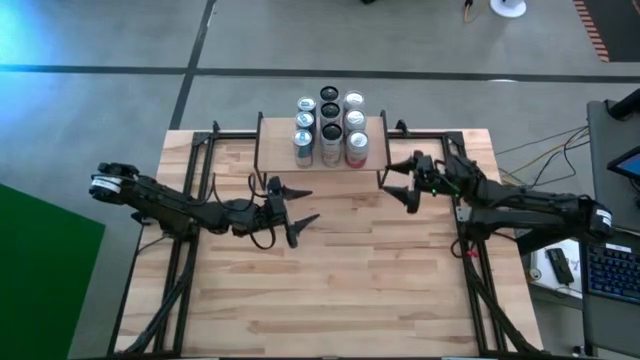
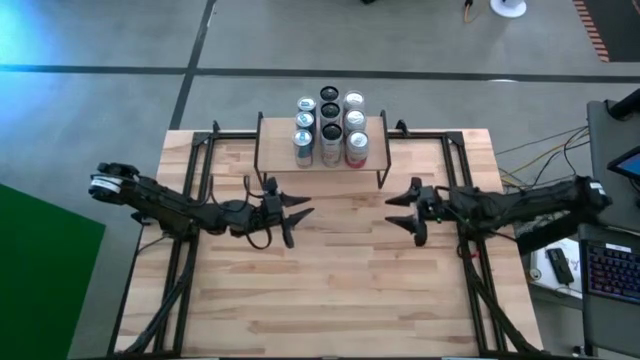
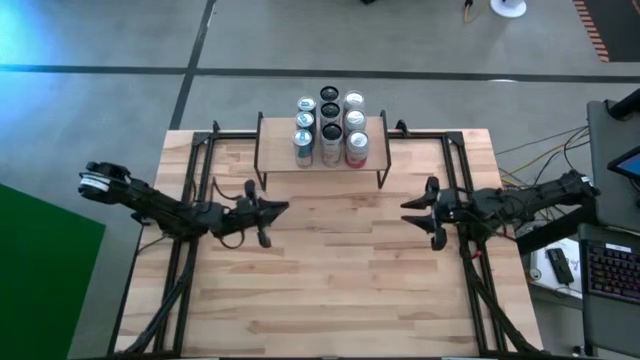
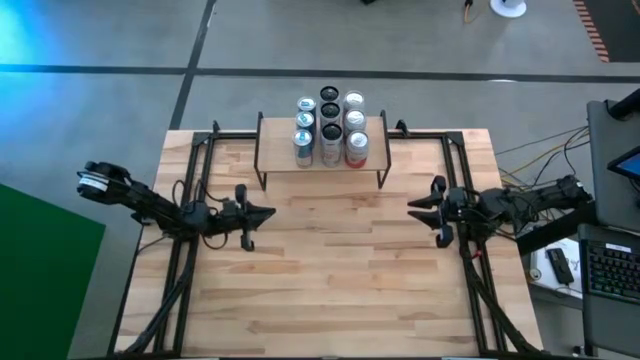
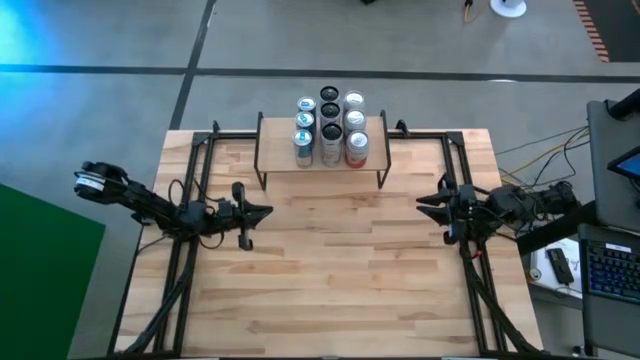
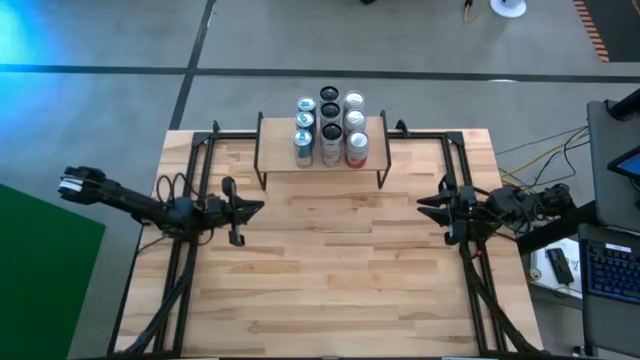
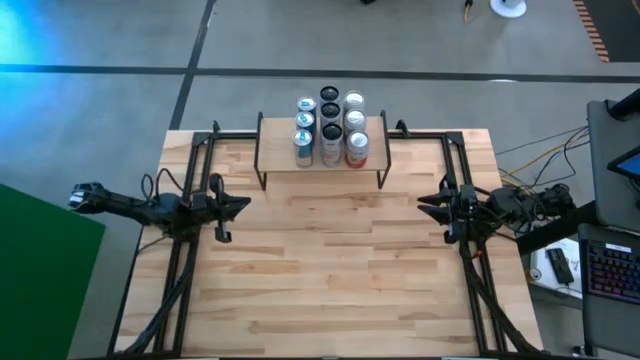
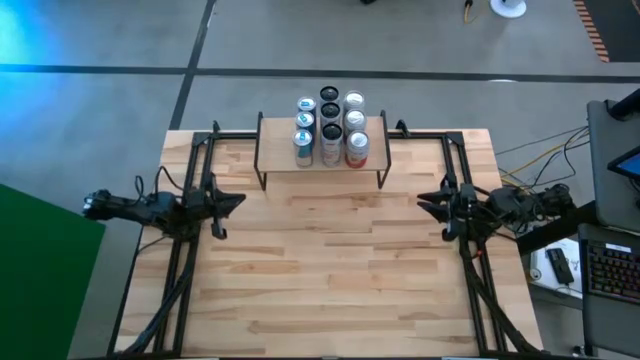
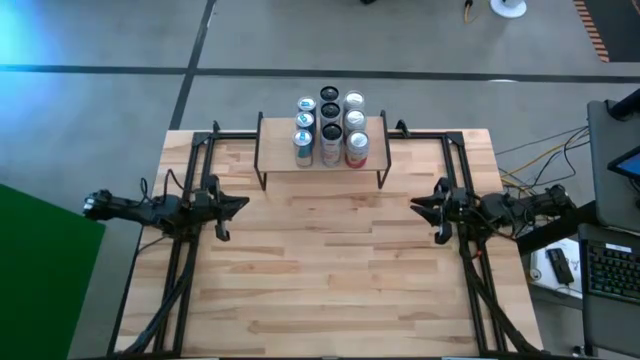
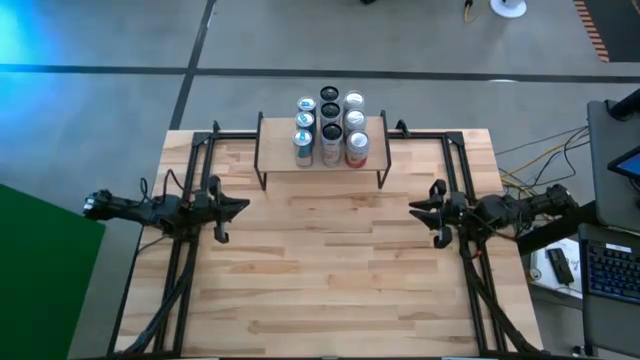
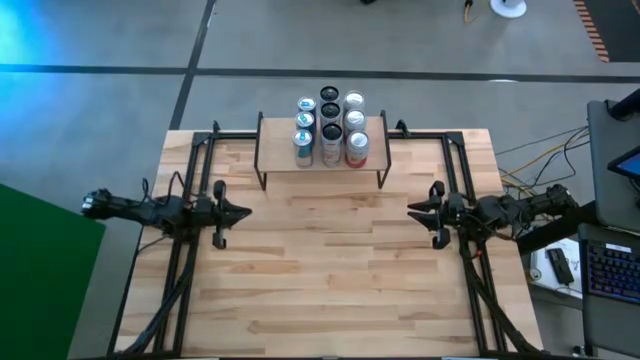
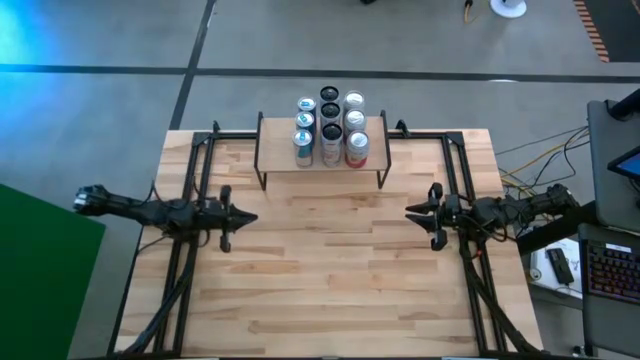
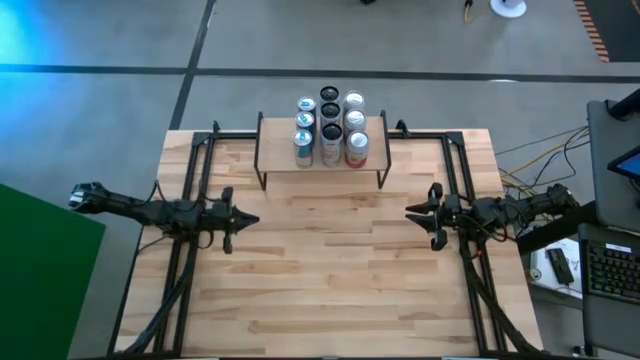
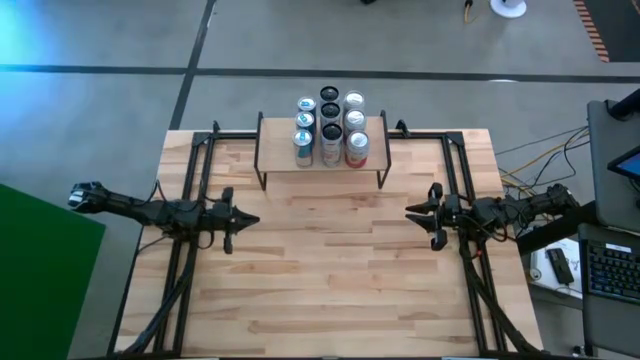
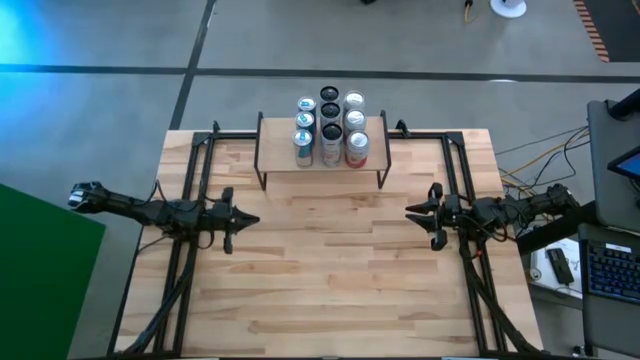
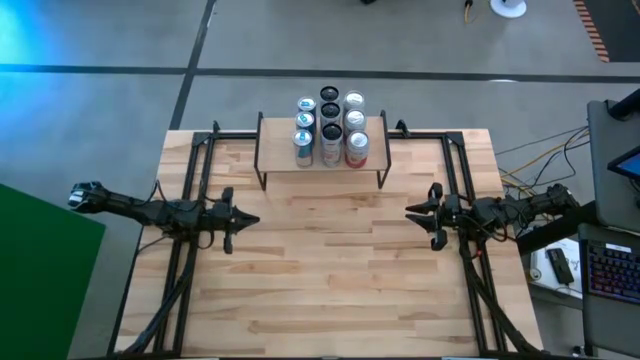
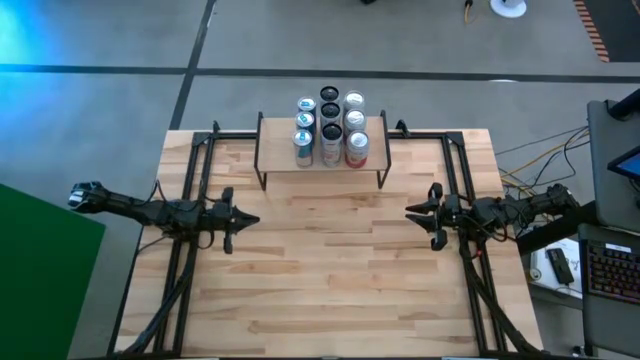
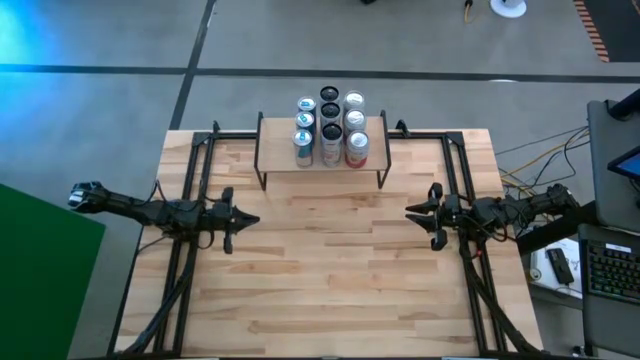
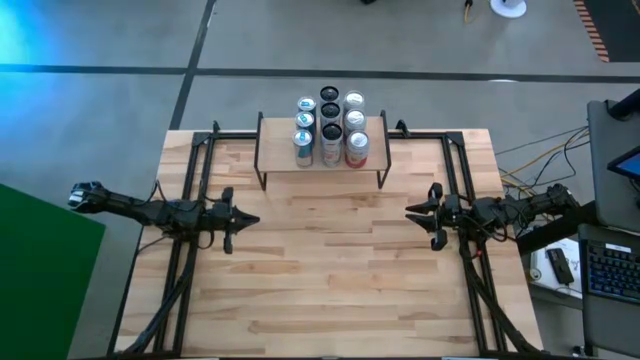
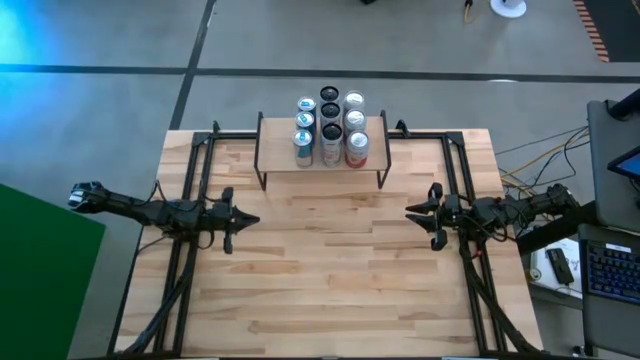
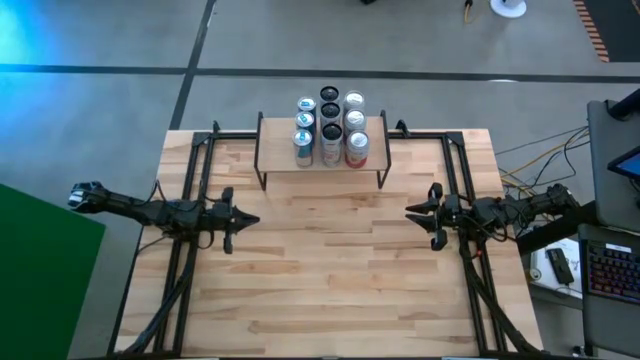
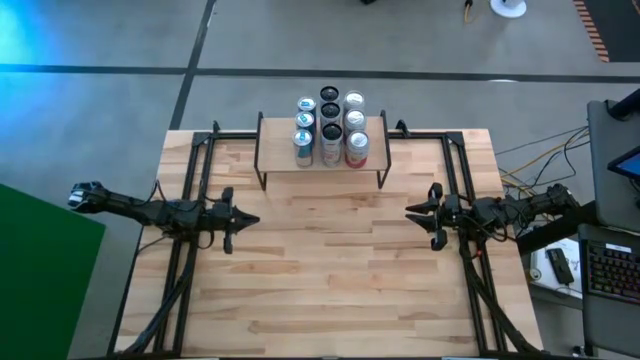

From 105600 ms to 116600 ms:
Task: Place canned beverage on shelf
Return to home position

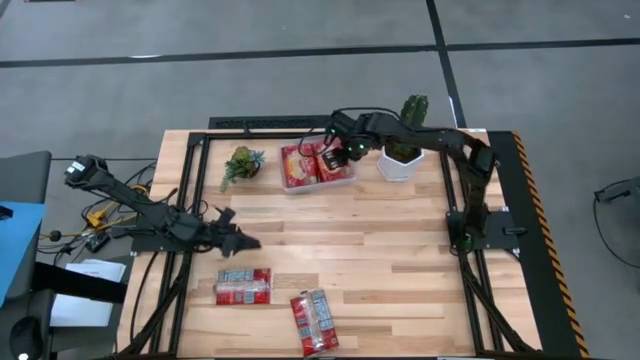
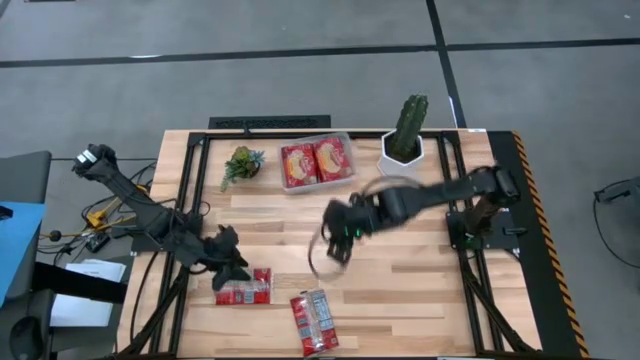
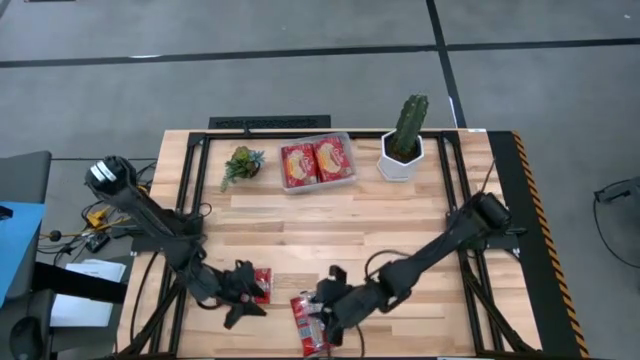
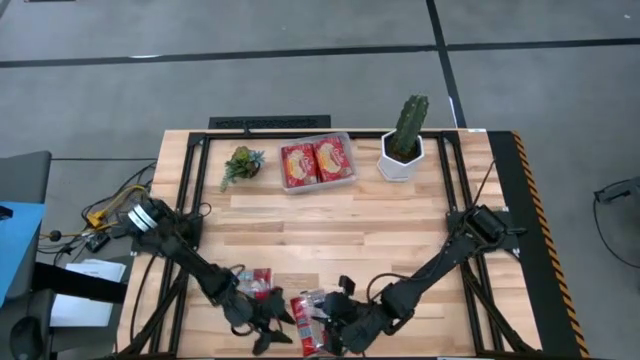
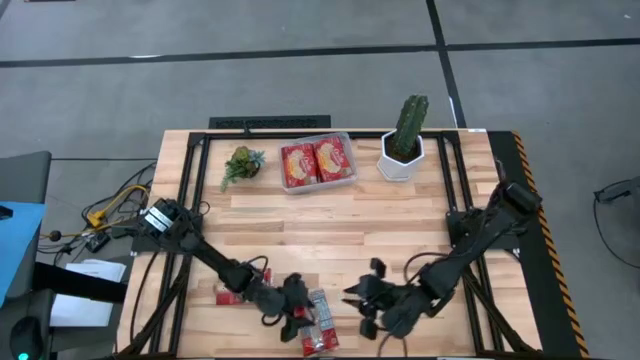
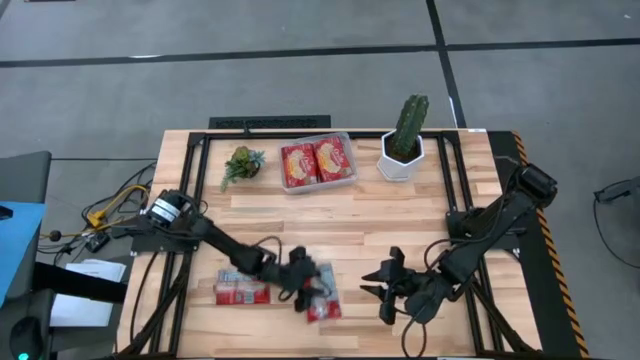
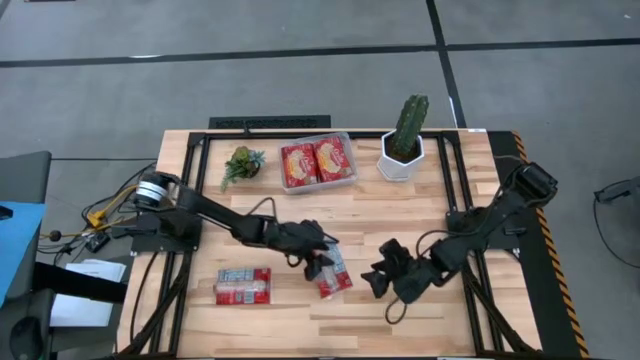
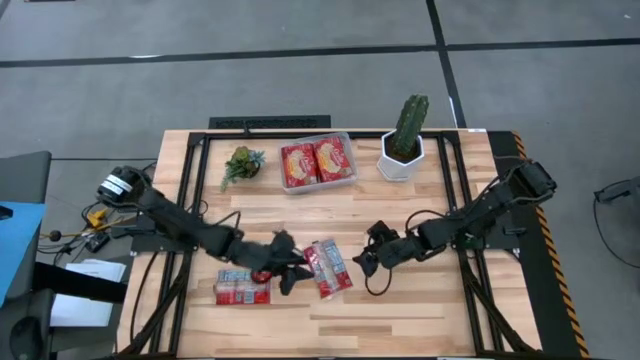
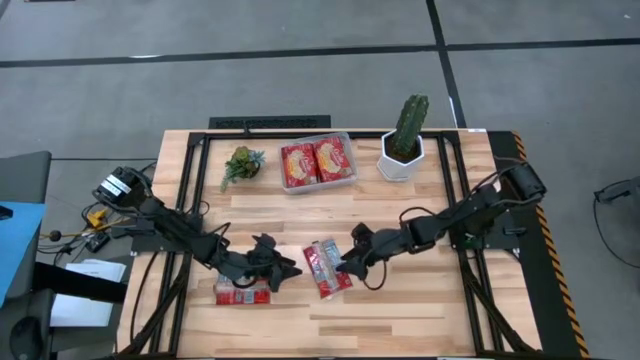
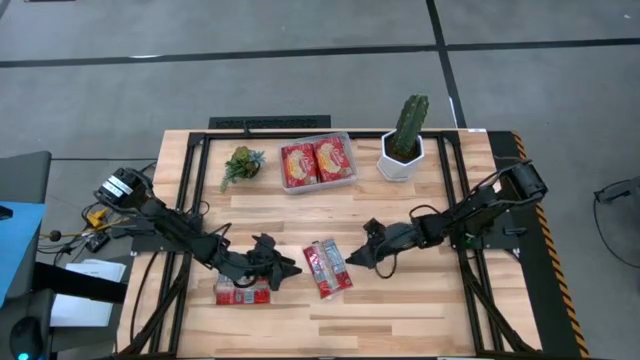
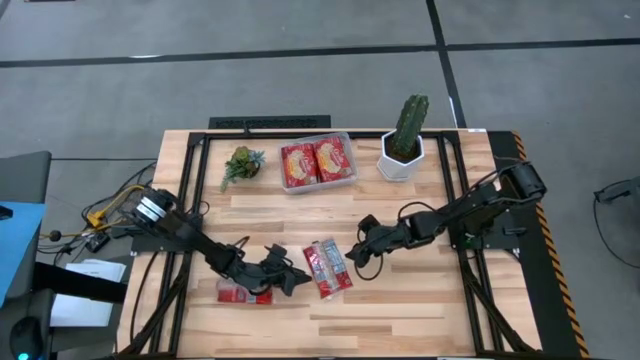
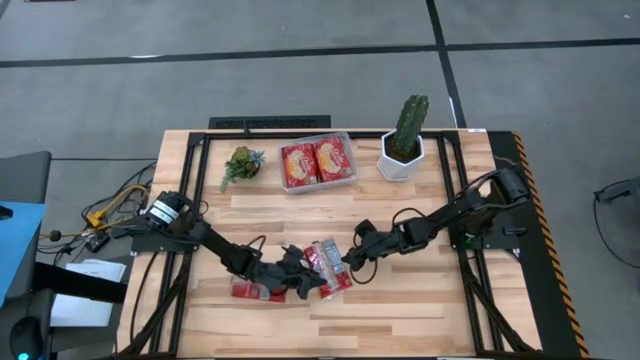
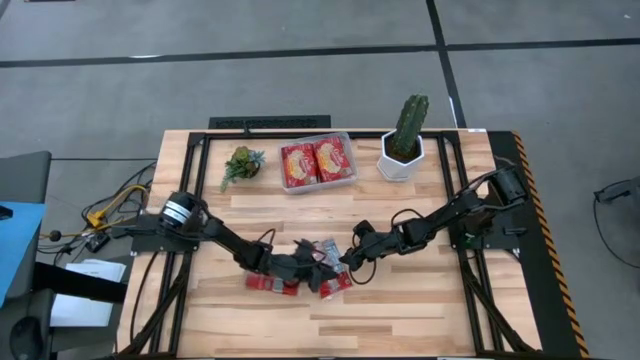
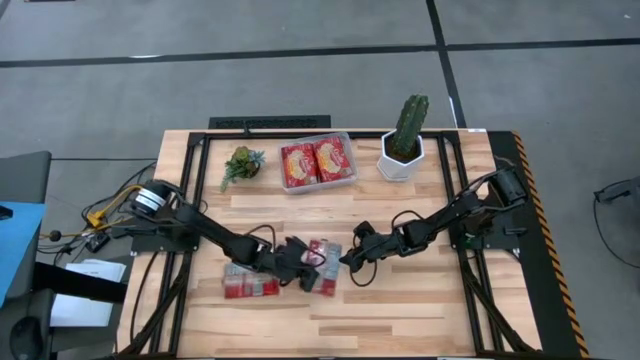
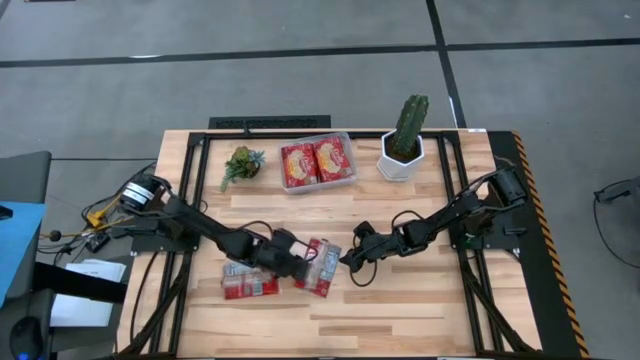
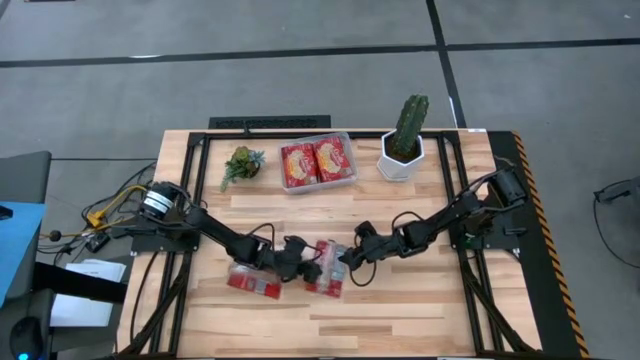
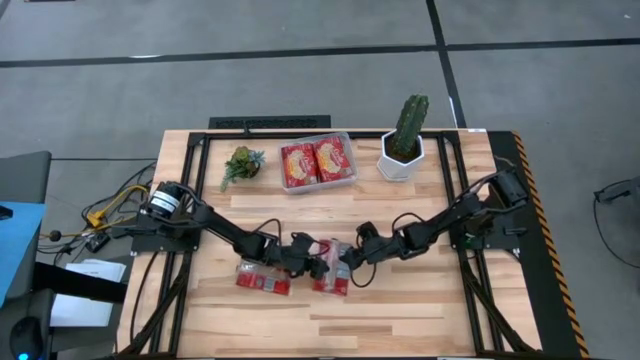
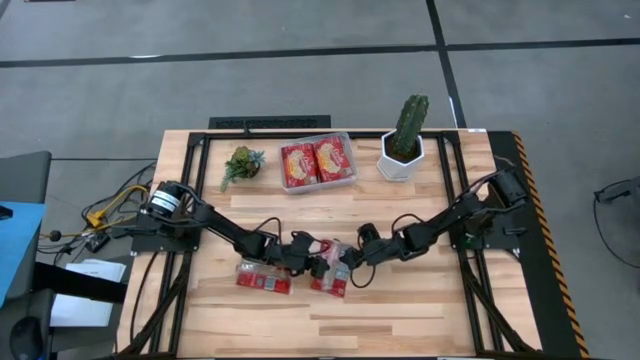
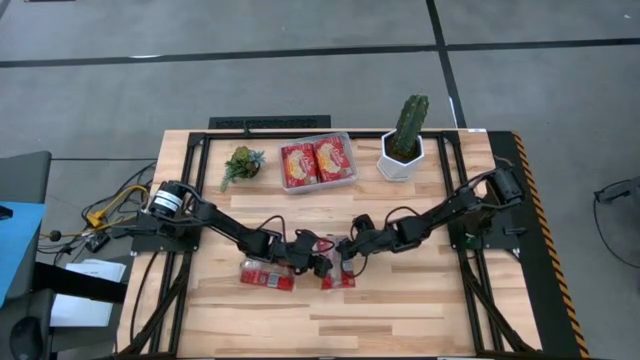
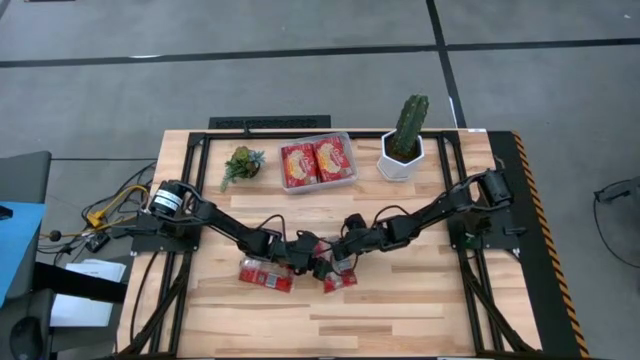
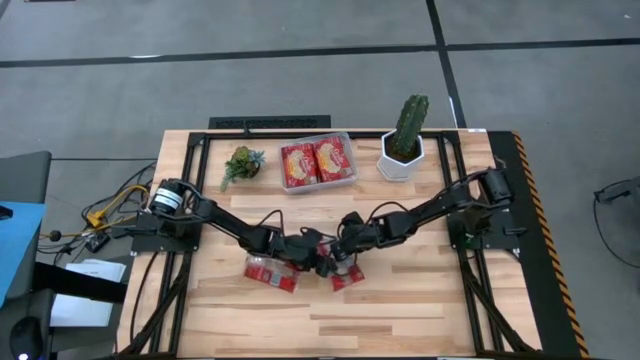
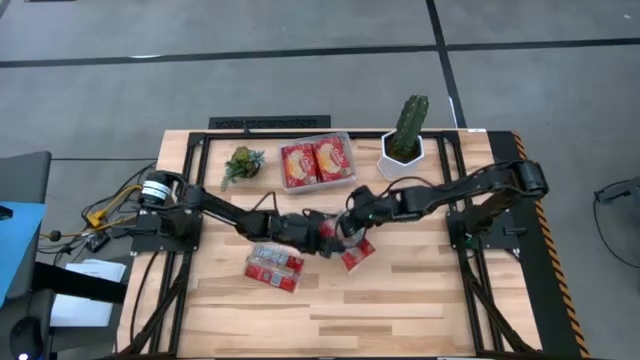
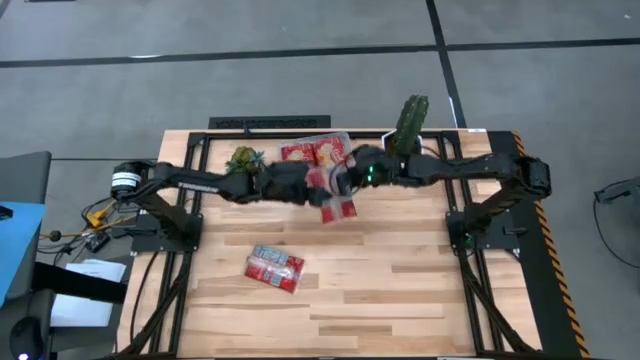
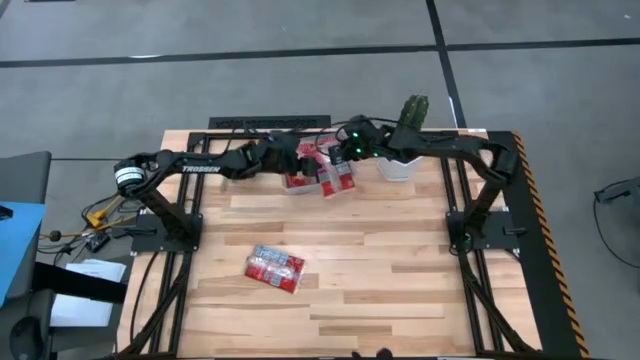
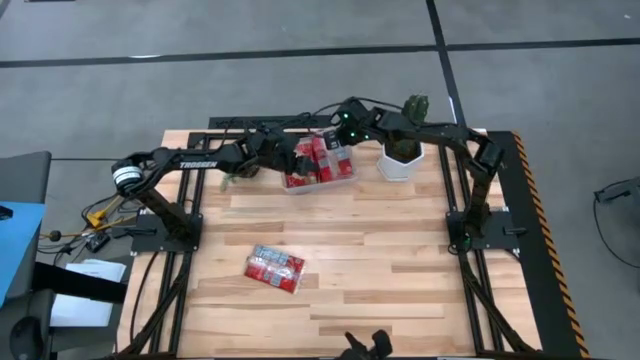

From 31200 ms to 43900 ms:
Task: Sort popcorn bags into baskets
Put the red popcorn bag into the transparent bin
